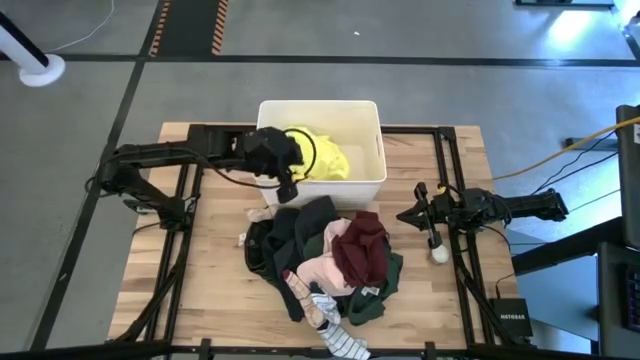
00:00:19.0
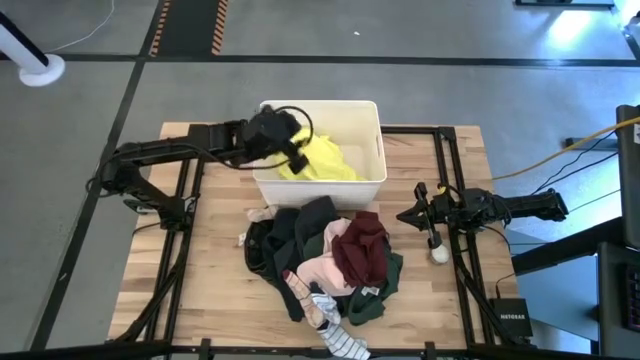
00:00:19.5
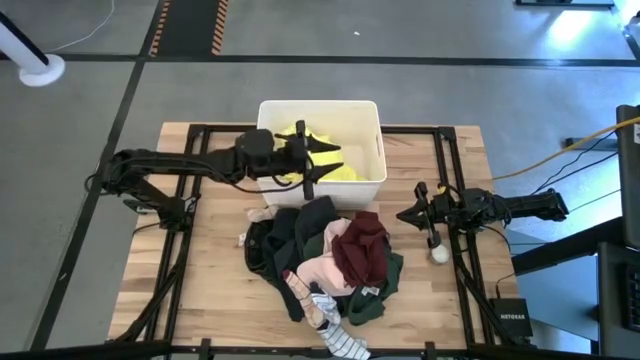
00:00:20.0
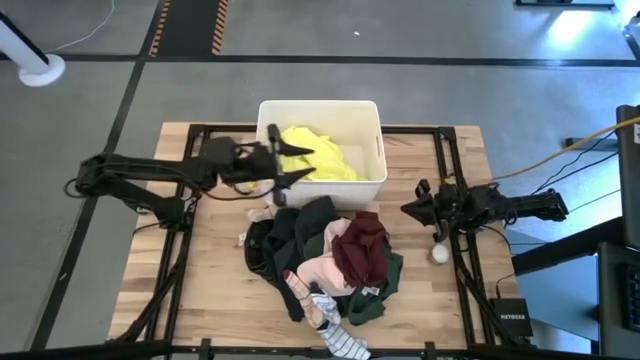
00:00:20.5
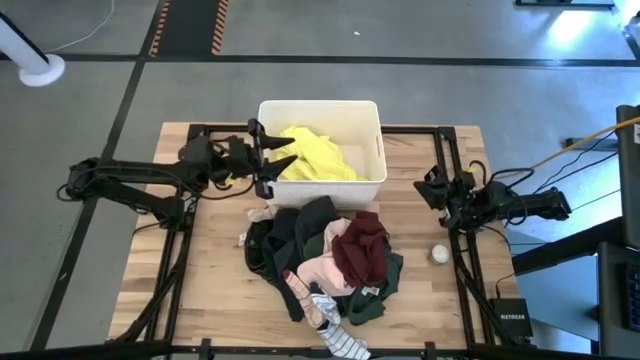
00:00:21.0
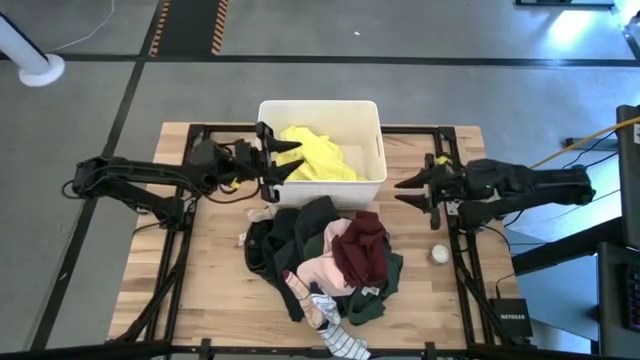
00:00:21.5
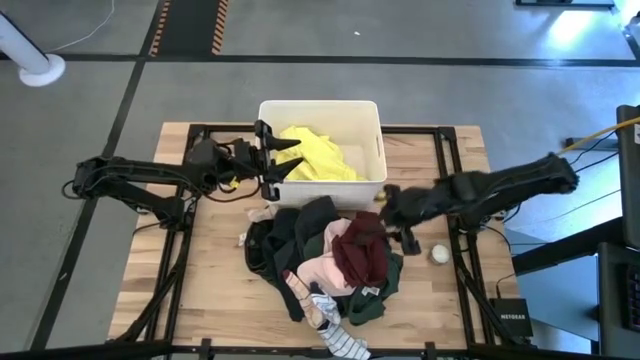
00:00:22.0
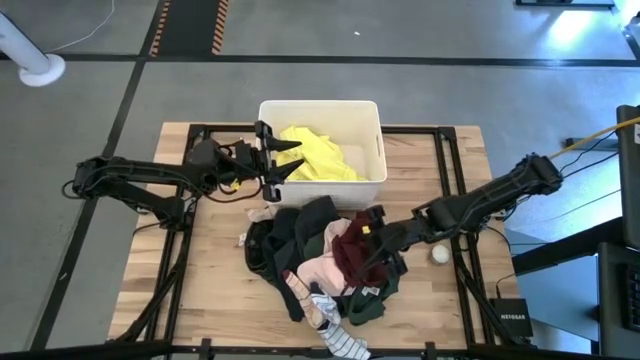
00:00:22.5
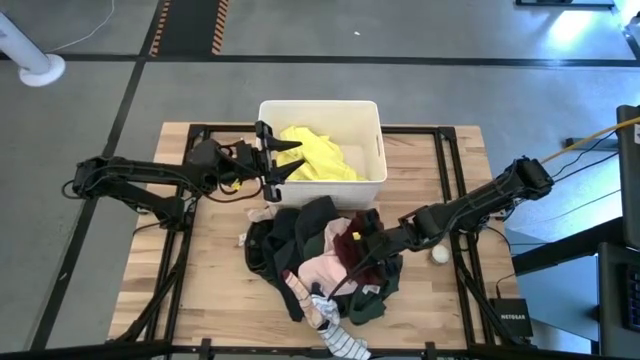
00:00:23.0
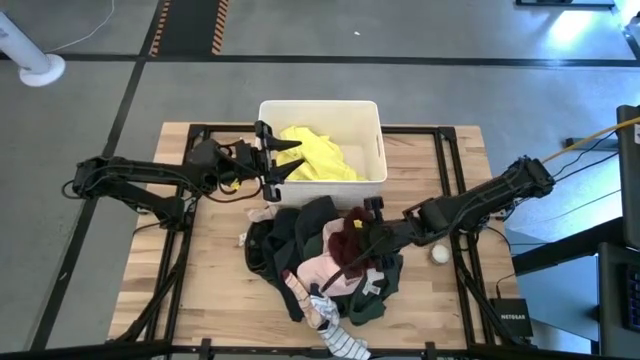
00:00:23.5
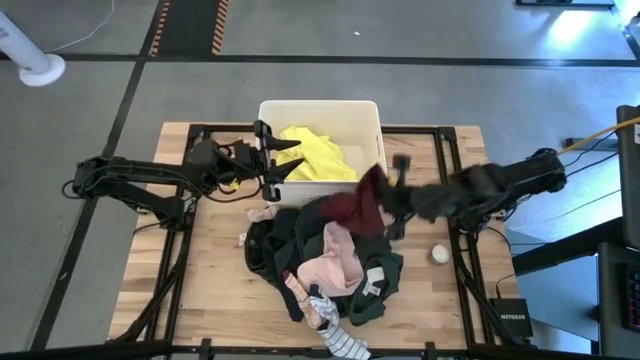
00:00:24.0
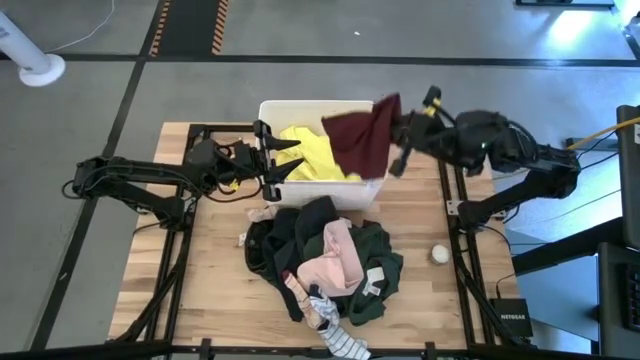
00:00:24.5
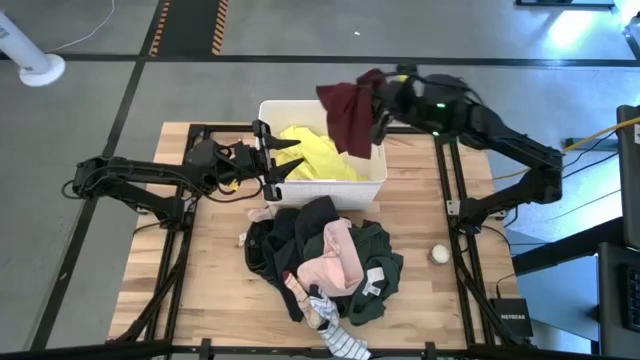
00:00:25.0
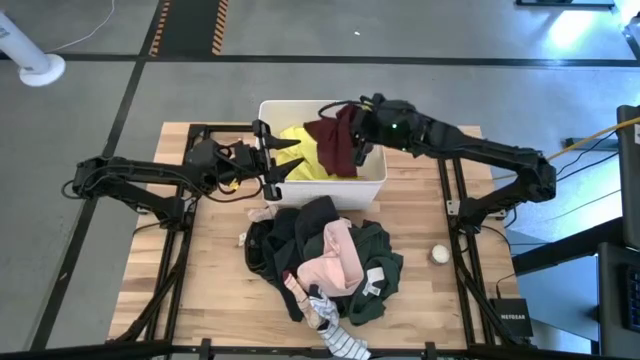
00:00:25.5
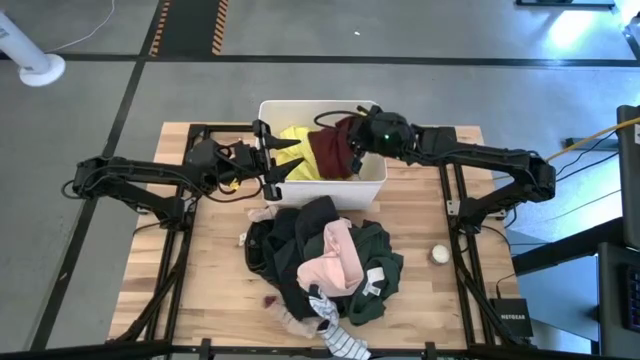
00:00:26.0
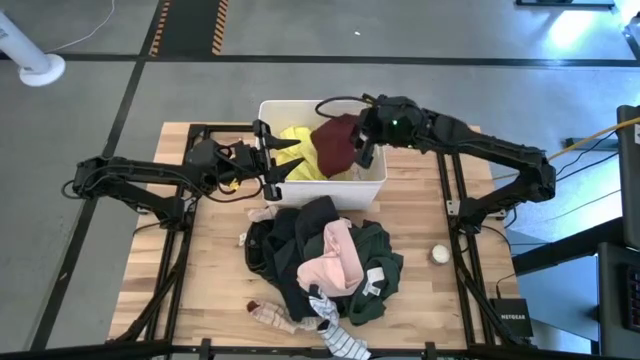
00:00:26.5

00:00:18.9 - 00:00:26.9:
Task: Sort clothes
Put the maroon underwear into the white bin

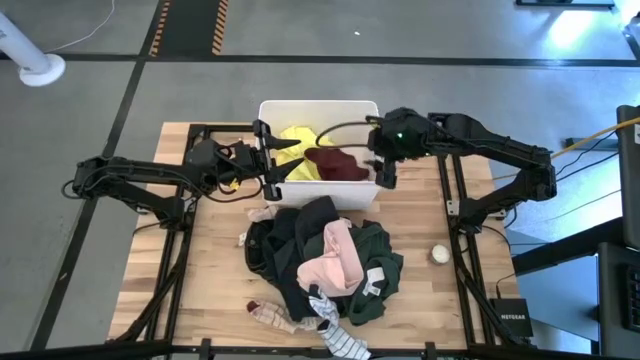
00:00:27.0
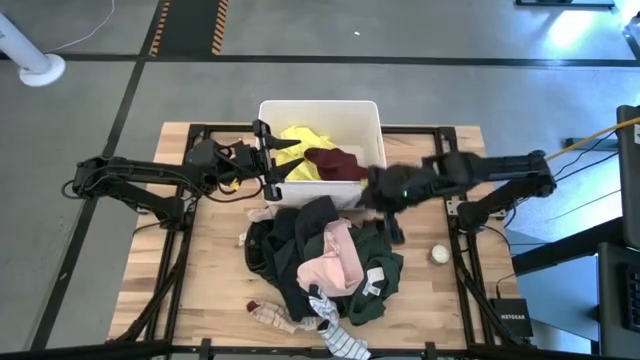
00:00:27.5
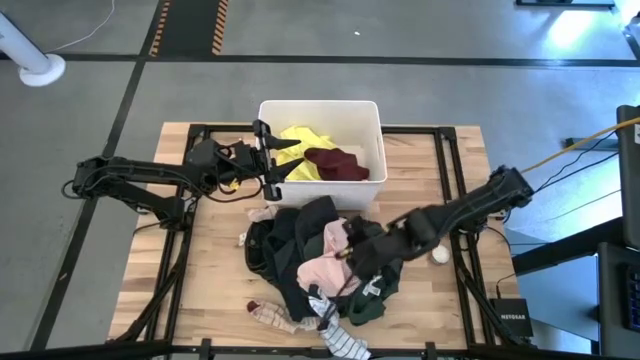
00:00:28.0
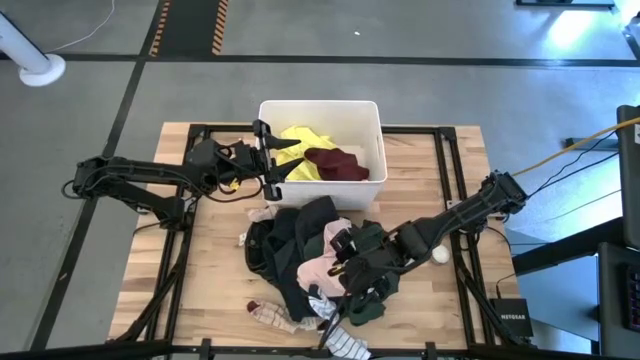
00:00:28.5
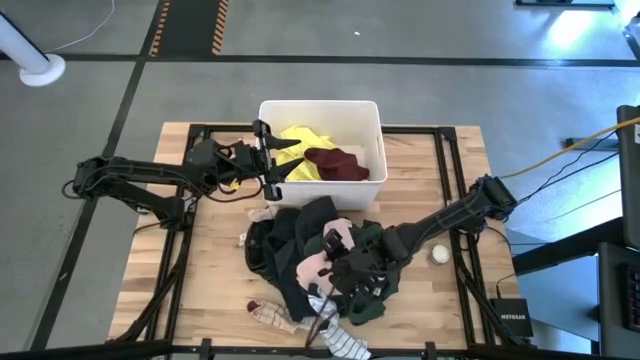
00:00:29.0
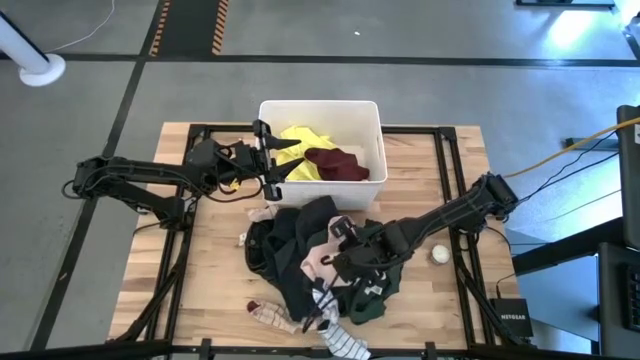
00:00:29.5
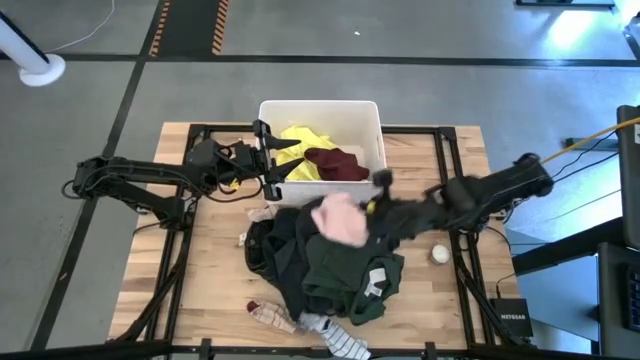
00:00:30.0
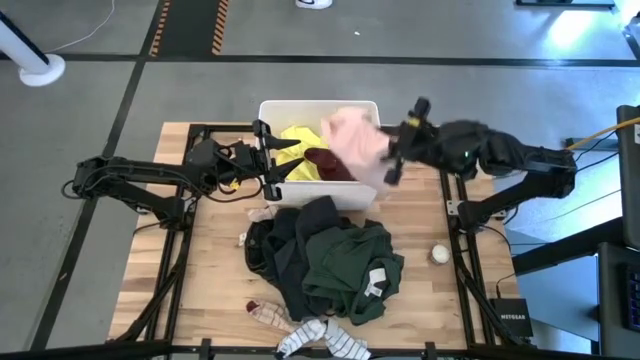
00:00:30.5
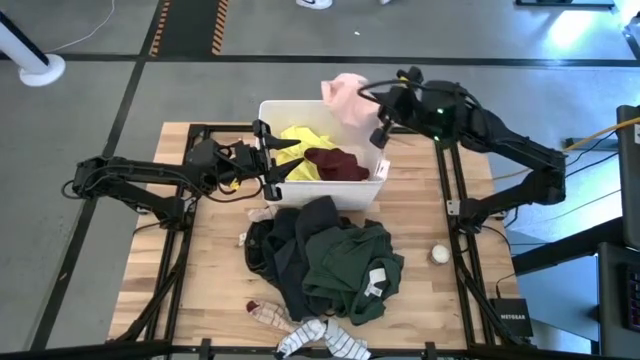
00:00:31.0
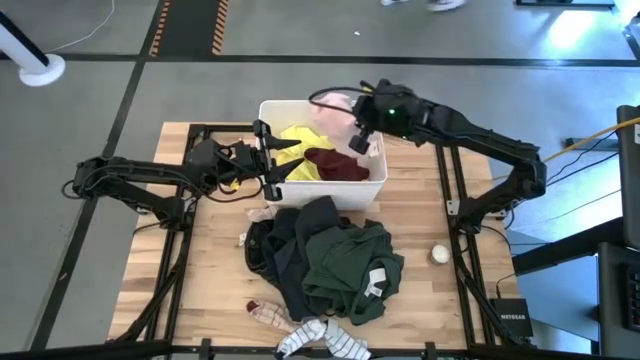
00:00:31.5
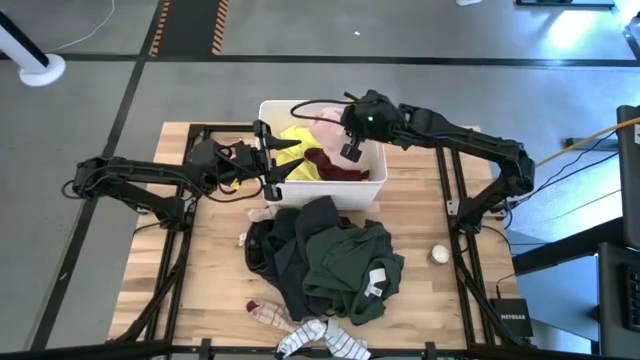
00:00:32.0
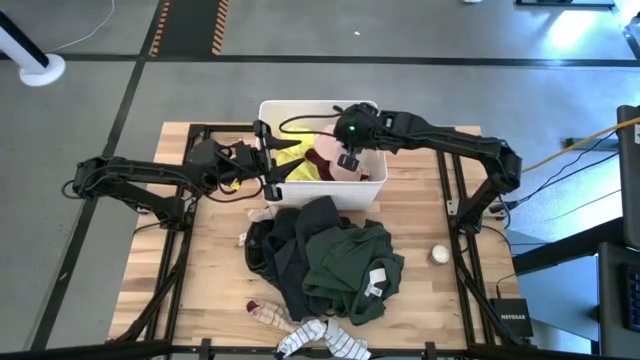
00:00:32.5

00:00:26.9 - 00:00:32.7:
Put the pink underwear into the white bin

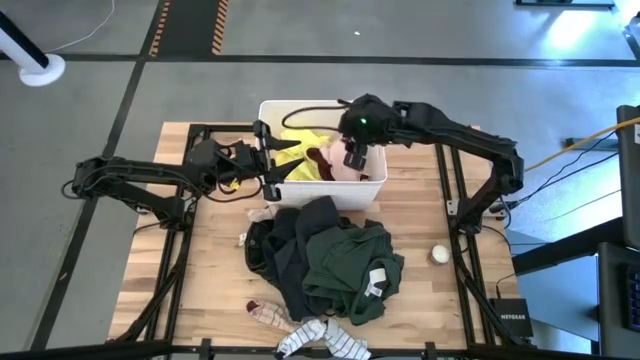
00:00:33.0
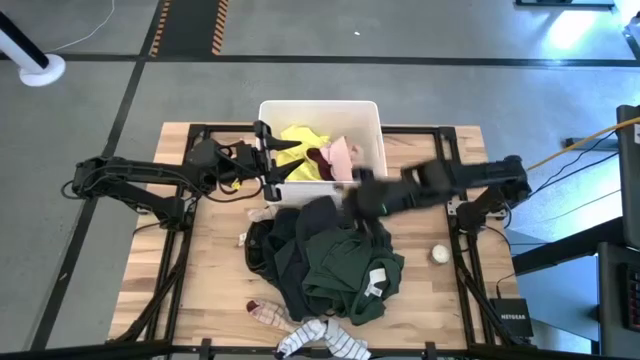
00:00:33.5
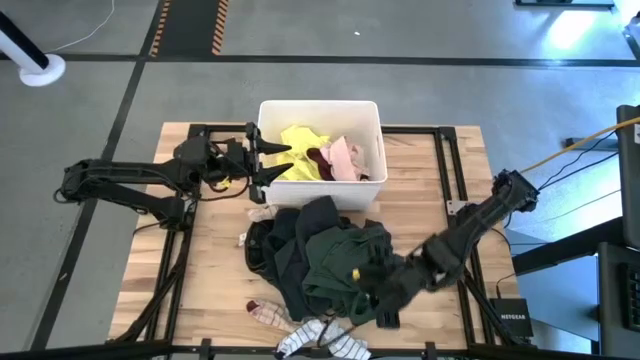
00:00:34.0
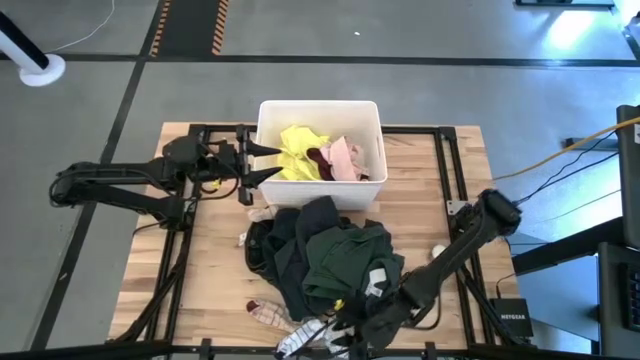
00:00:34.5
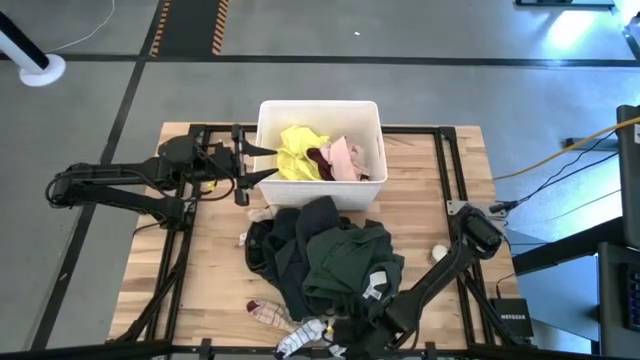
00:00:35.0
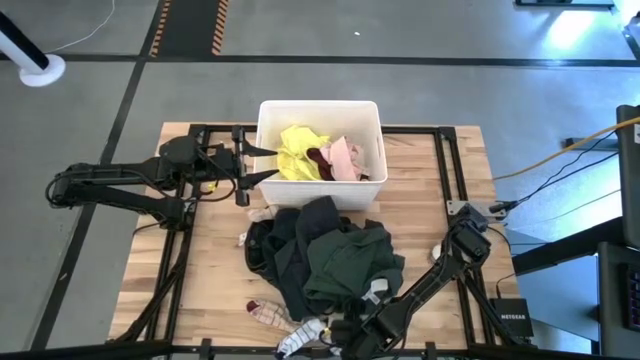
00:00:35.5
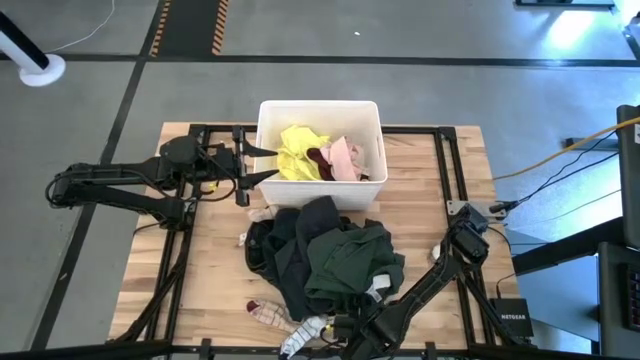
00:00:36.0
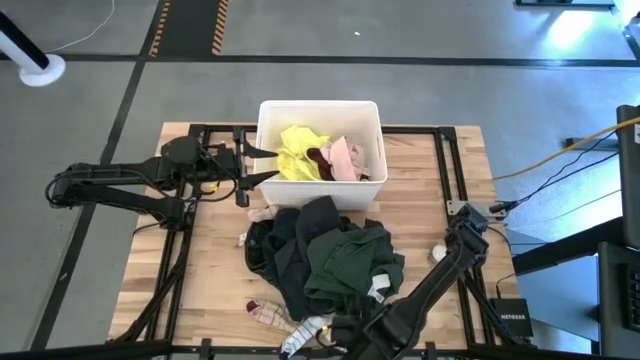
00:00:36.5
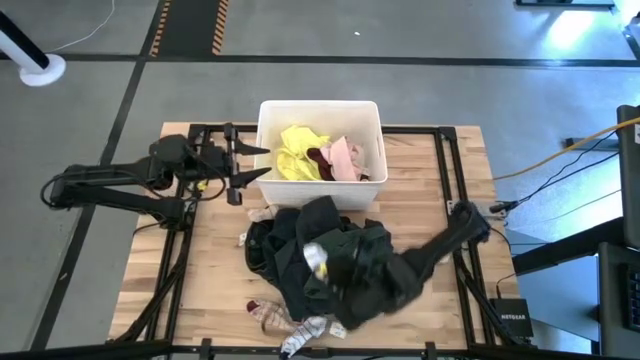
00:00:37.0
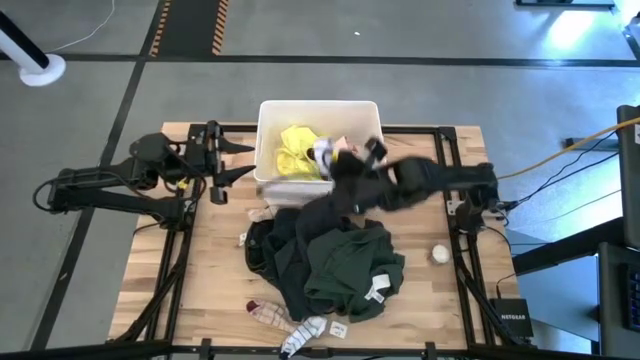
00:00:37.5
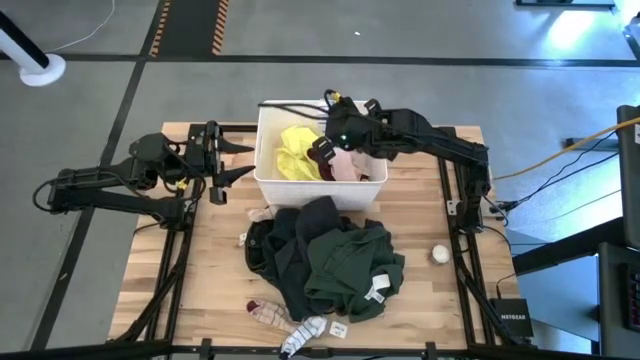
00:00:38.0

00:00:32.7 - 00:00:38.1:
Put the right white sock into the white bin

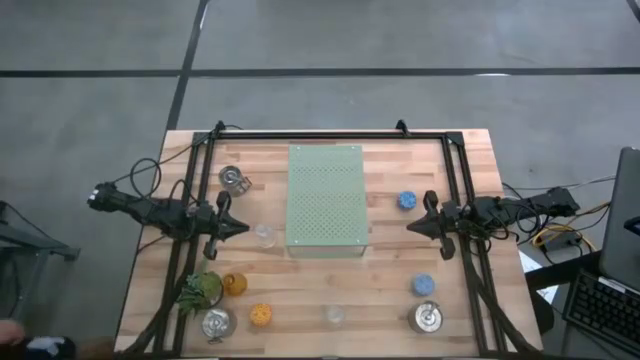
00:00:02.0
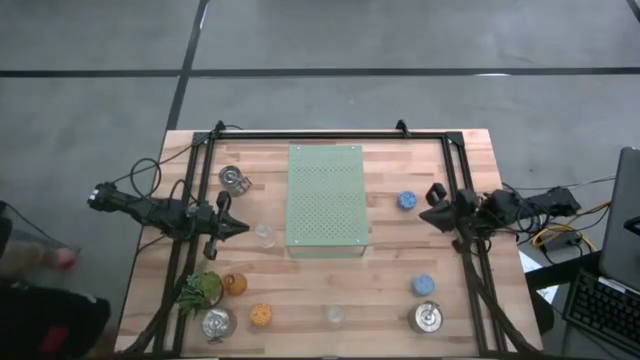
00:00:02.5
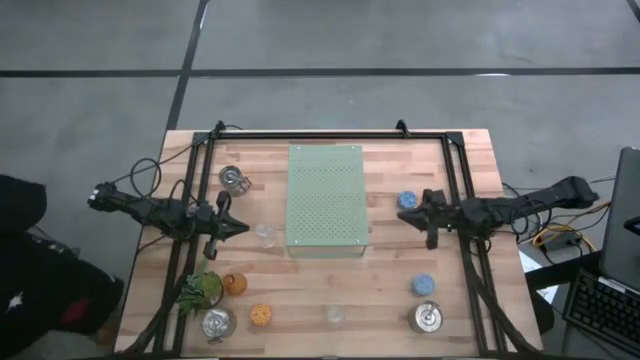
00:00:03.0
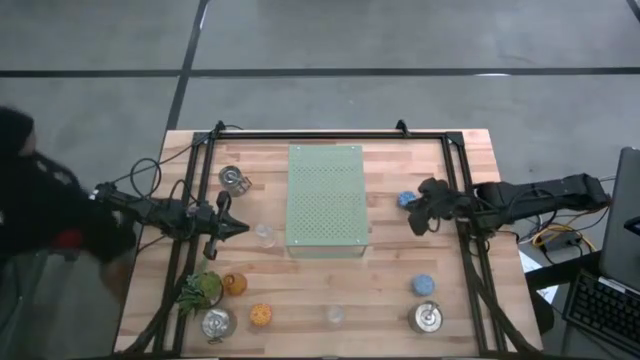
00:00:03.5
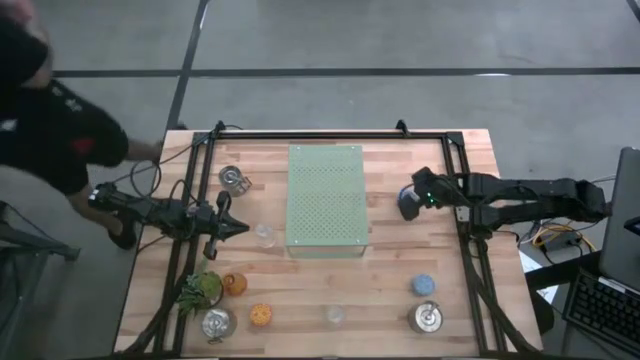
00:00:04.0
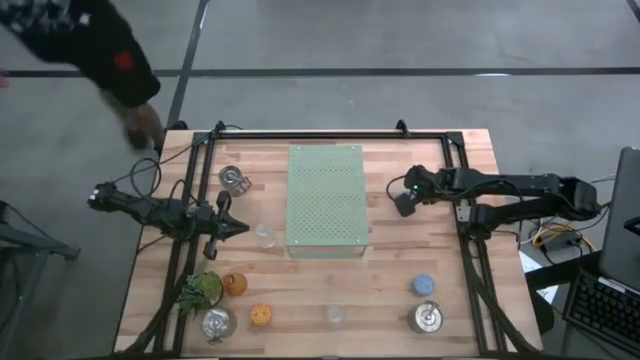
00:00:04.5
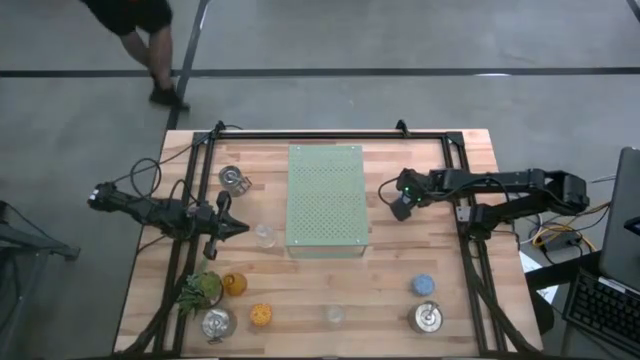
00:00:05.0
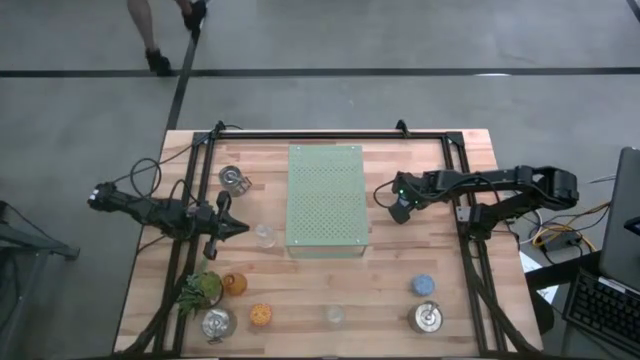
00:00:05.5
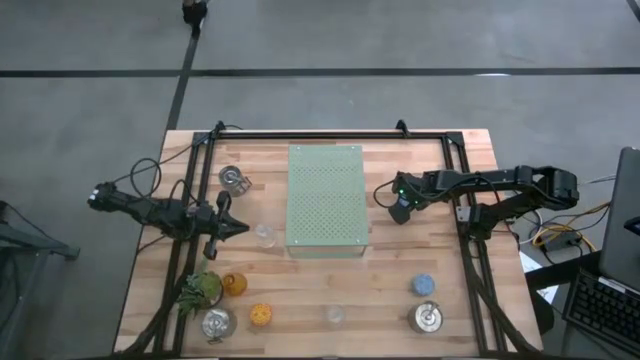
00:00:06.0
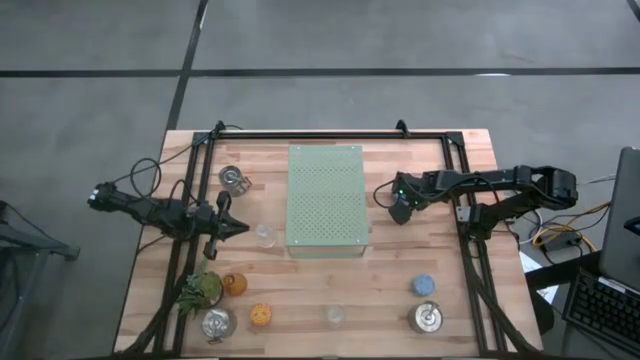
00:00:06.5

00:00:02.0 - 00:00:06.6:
Task: Pick & Place candle stick holders
Put the blue patterned scented candle on the shelf
